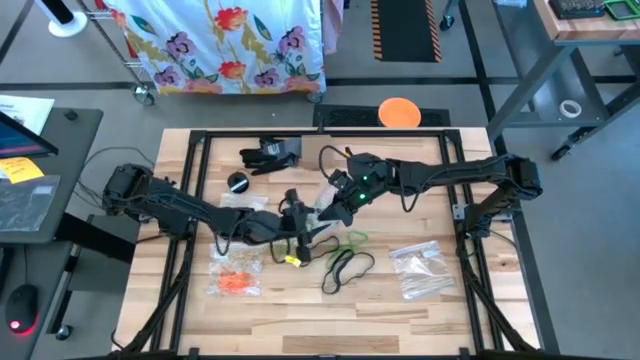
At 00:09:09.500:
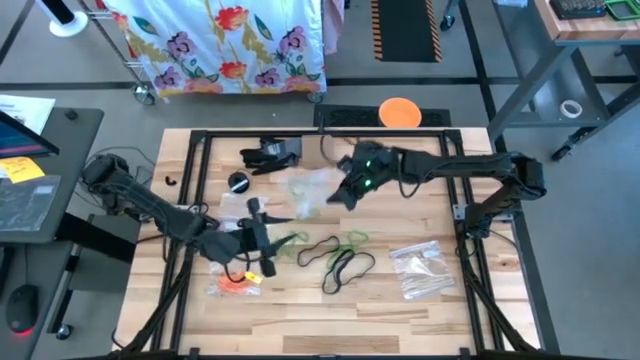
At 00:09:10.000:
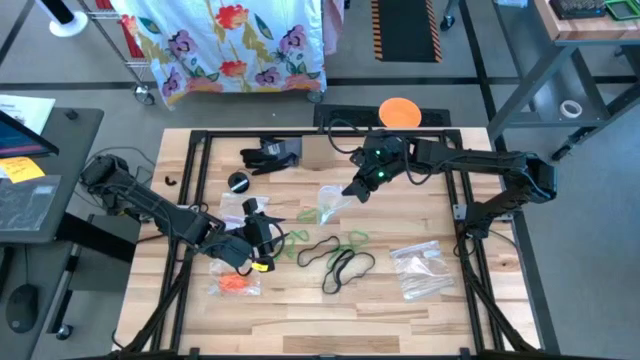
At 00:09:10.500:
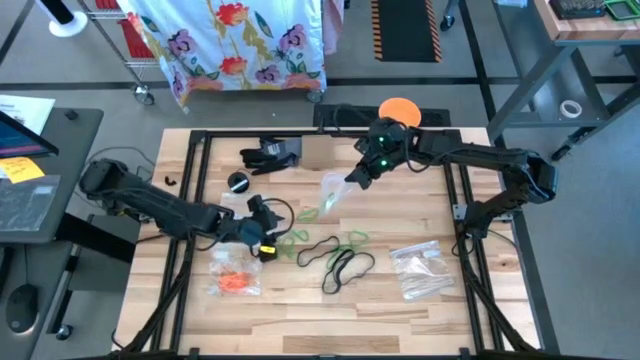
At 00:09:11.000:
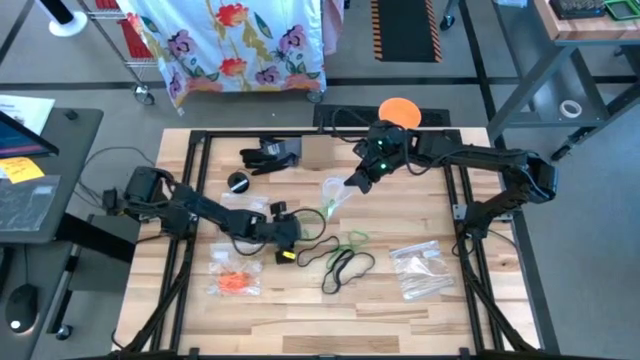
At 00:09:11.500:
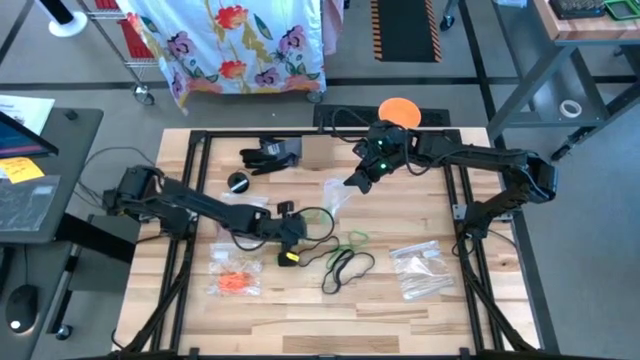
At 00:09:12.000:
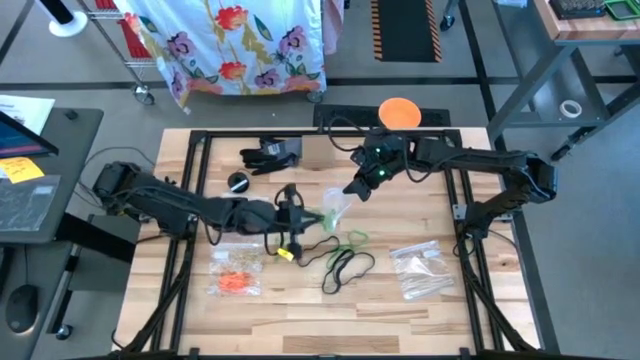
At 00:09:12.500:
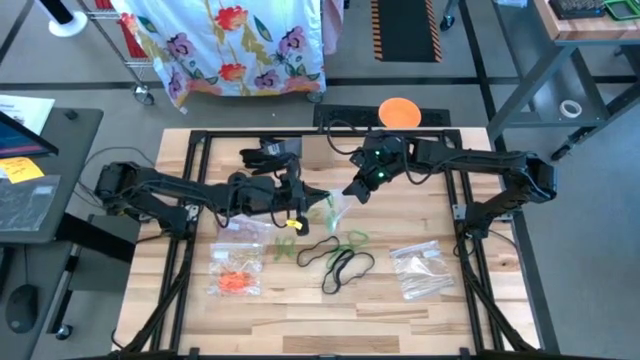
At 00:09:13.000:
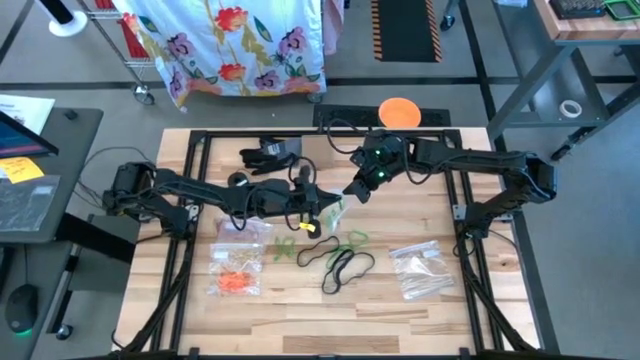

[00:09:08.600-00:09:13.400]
Task: Sort rubber bands
Put the green rubber band into the transparent zip bag

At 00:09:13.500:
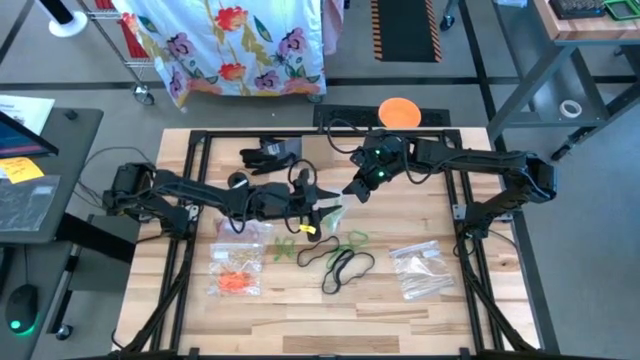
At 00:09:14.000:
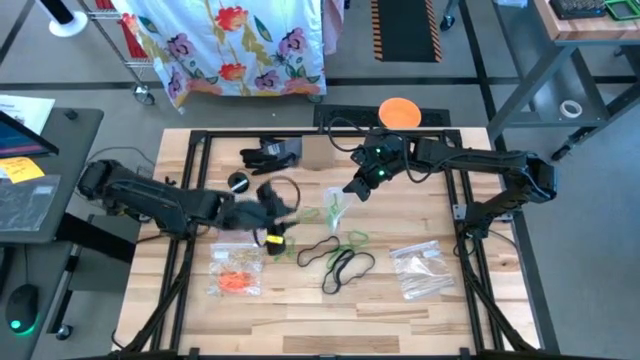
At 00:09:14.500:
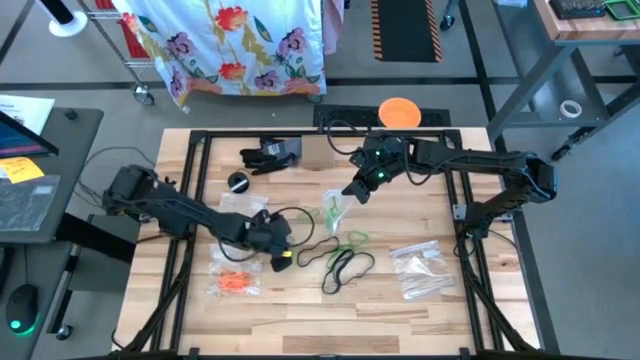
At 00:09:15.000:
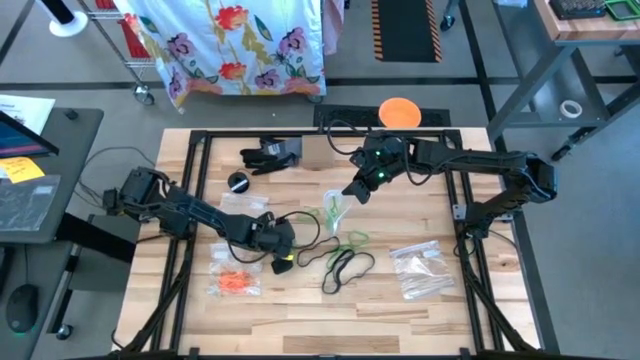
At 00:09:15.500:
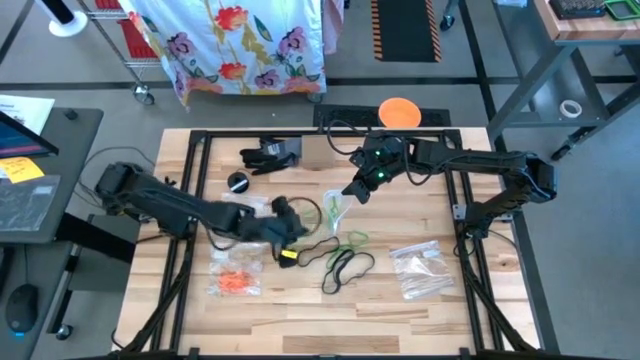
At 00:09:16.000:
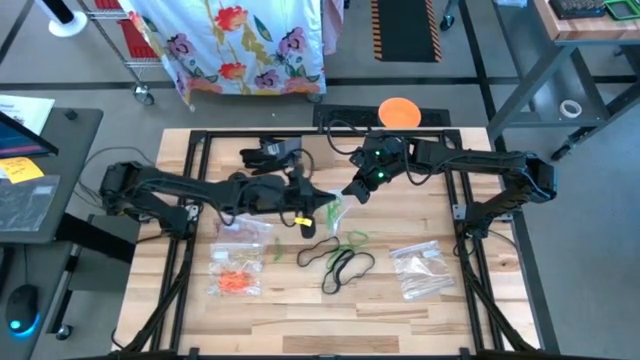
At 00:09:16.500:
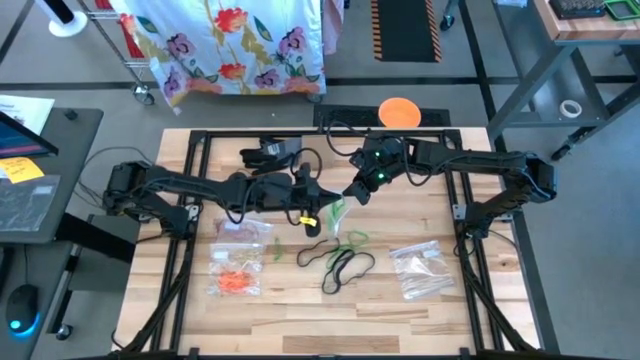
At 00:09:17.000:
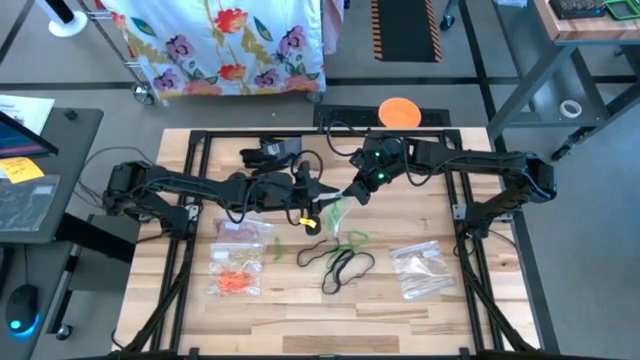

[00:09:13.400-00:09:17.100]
Put the green rubber band into the transparent zip bag

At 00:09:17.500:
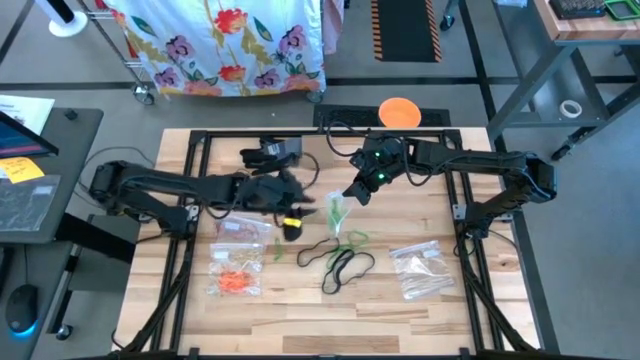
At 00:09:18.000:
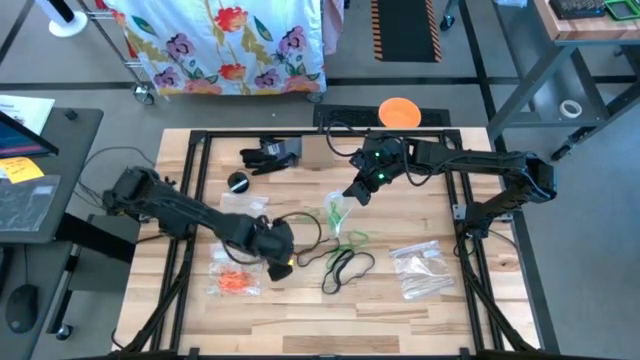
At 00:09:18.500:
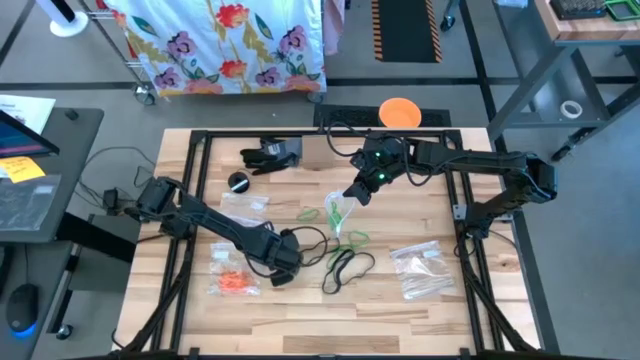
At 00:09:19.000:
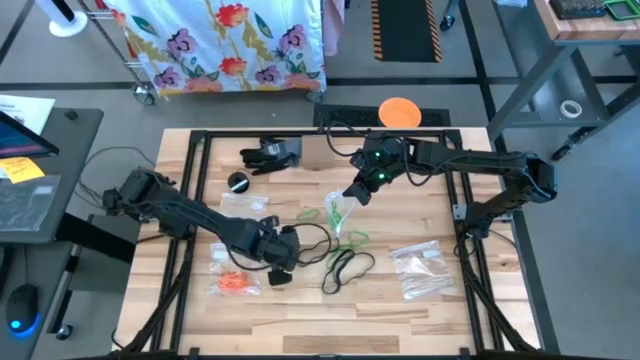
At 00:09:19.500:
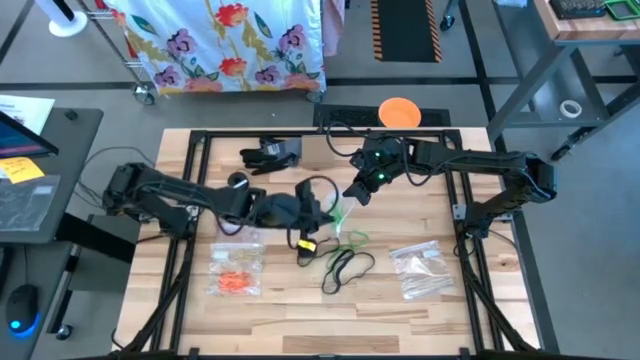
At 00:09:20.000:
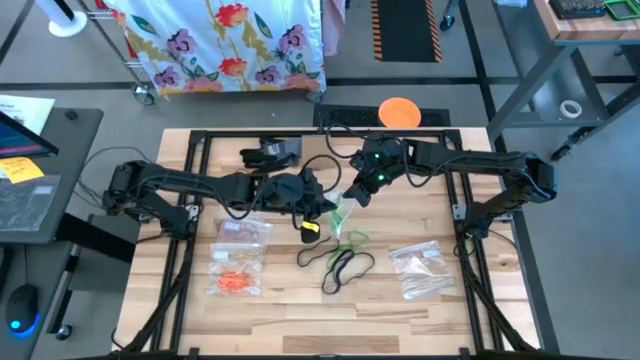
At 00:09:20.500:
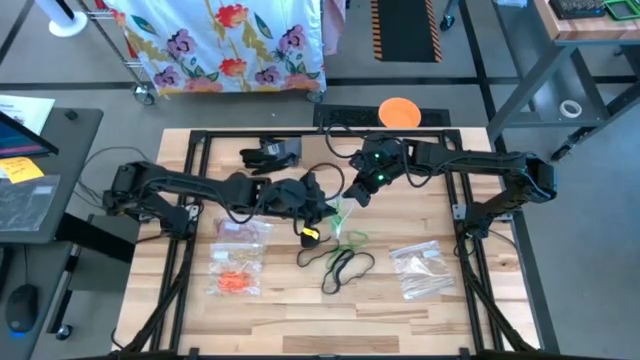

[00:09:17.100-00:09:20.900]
Put the green rubber band into the transparent zip bag

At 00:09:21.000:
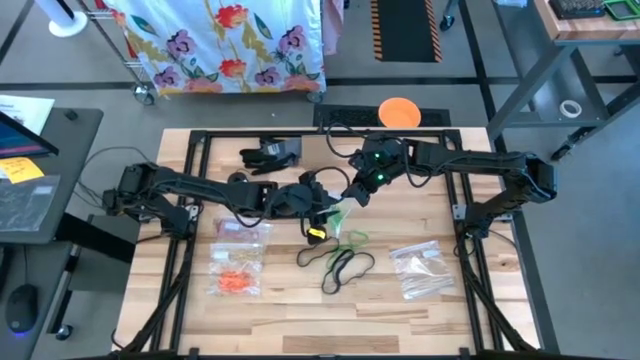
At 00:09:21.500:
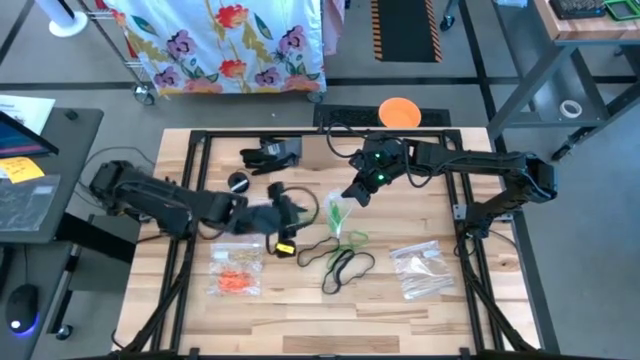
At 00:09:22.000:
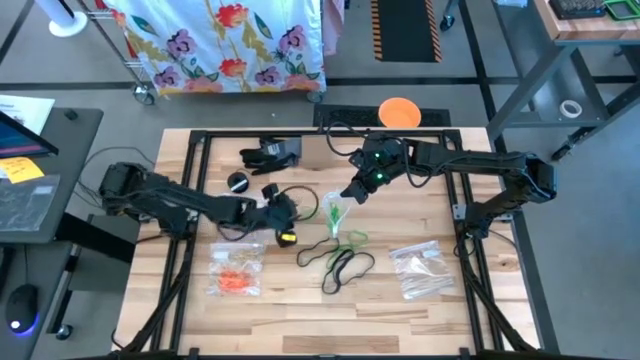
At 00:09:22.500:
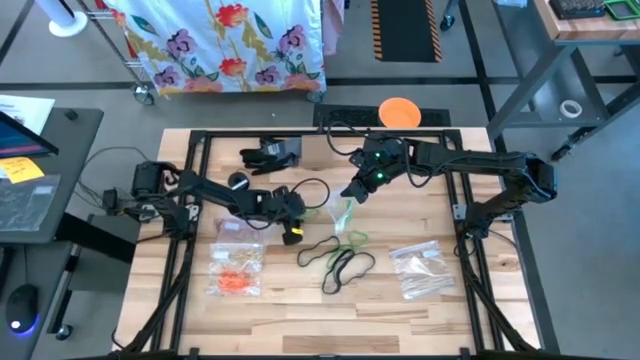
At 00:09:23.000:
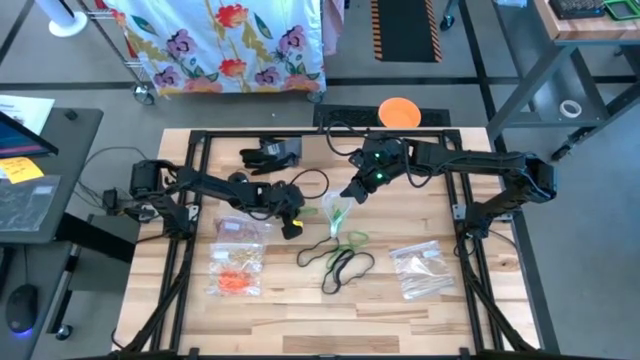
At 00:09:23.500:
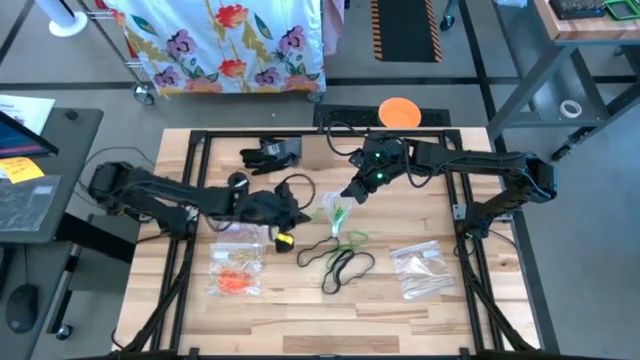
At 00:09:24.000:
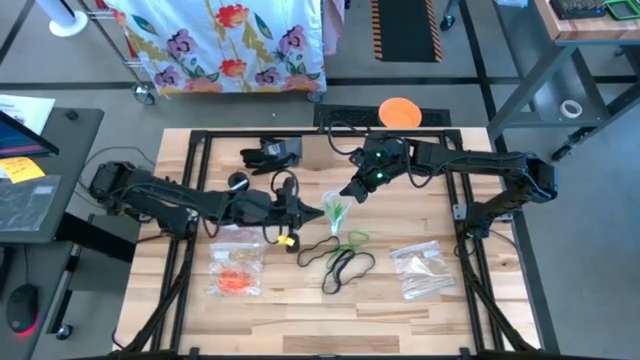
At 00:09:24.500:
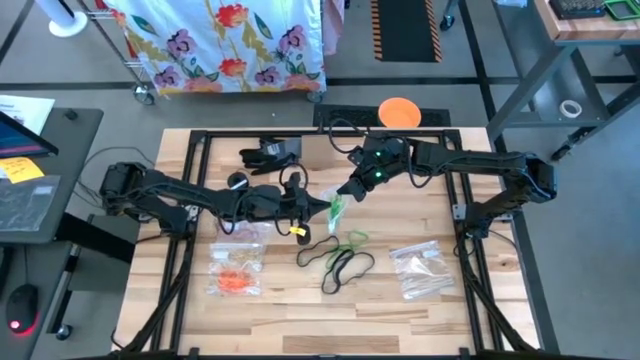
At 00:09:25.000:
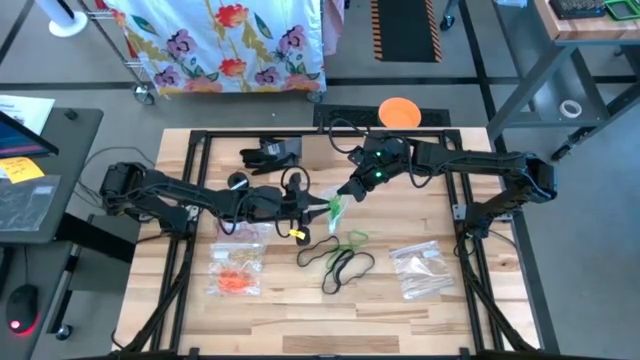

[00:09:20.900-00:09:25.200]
Put the green rubber band into the transparent zip bag

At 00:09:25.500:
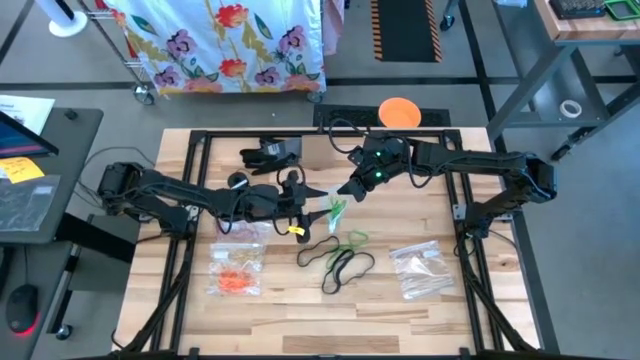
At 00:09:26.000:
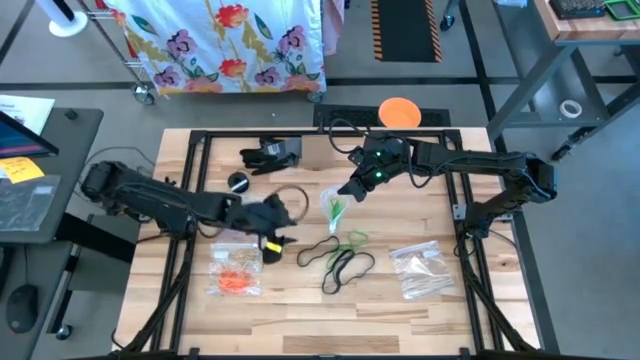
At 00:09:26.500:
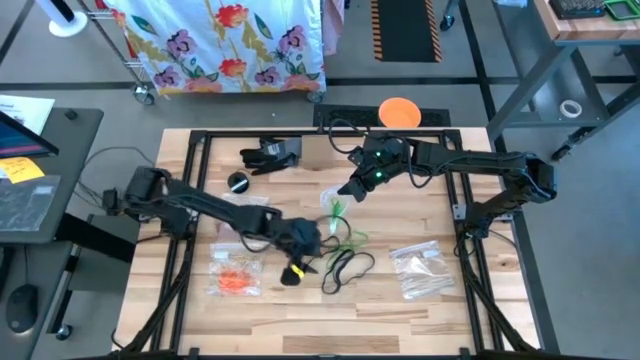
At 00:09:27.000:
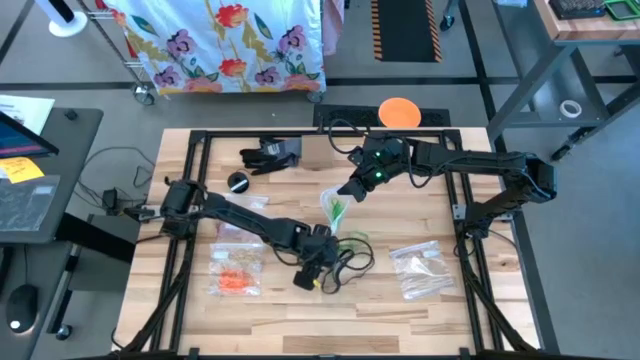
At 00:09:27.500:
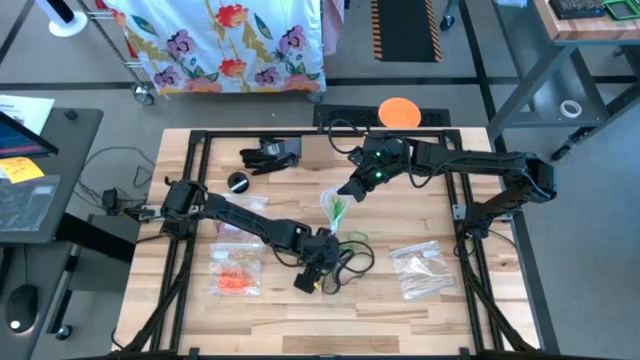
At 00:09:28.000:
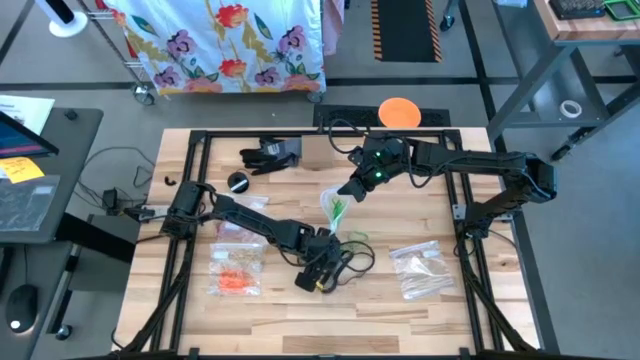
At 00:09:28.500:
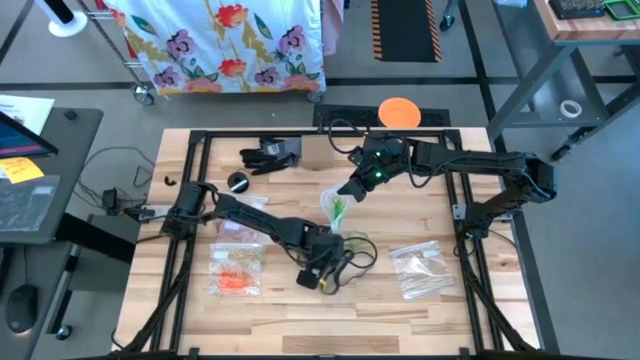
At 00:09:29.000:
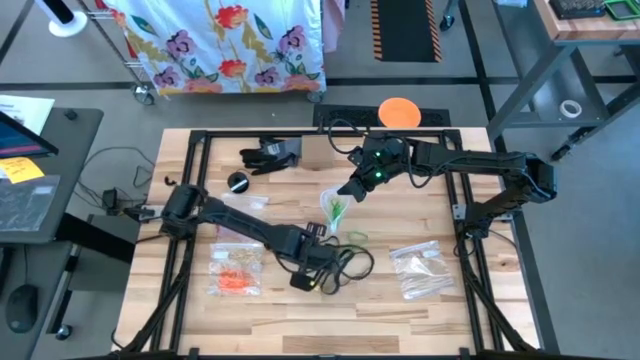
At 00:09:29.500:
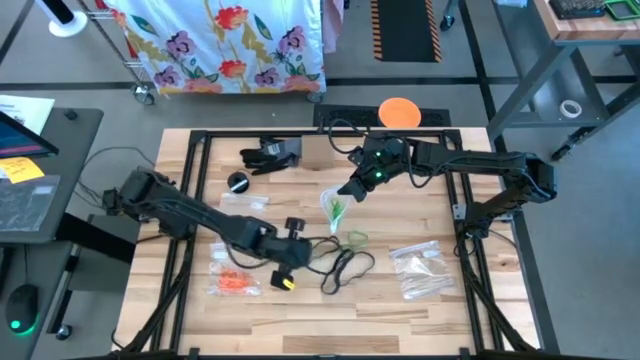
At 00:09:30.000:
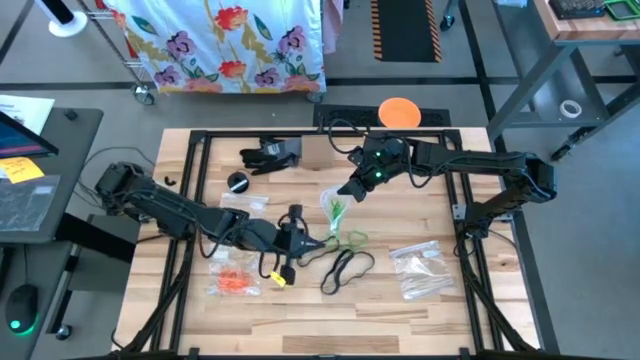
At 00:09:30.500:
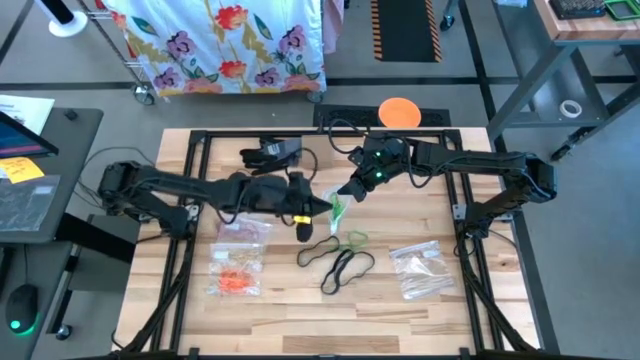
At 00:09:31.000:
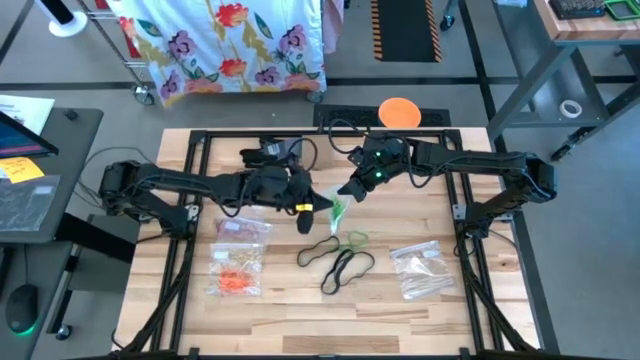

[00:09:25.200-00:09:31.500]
Put the green rubber band into the transparent zip bag
